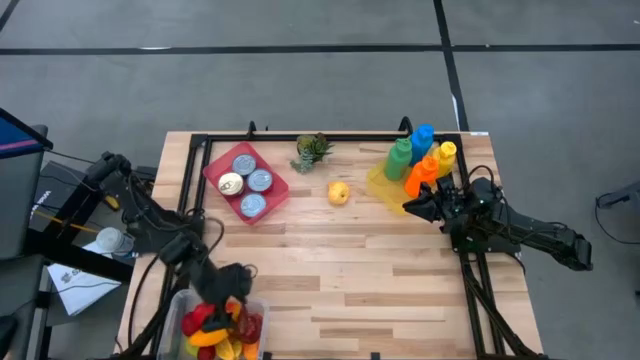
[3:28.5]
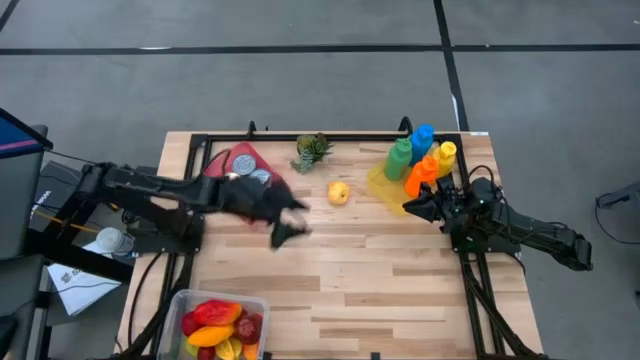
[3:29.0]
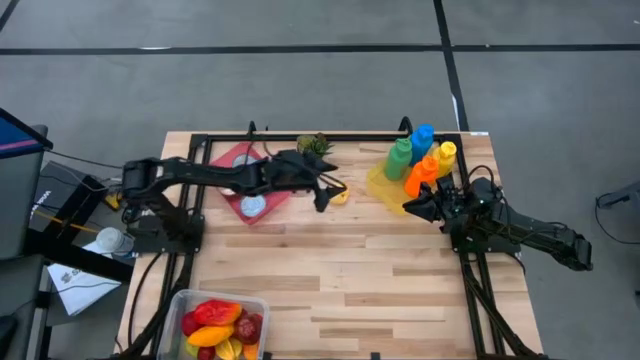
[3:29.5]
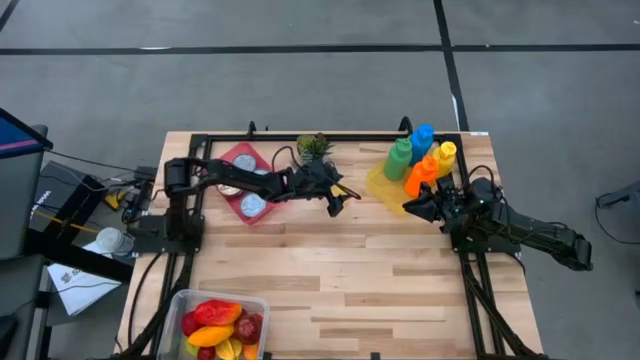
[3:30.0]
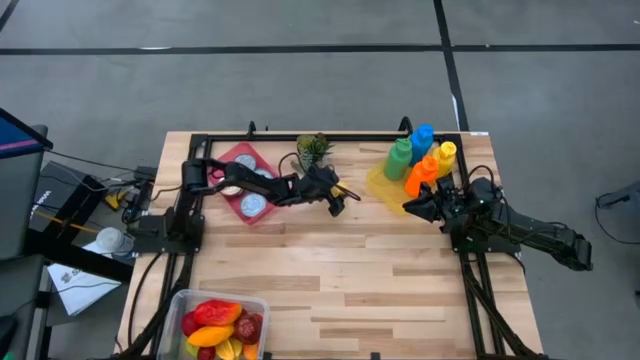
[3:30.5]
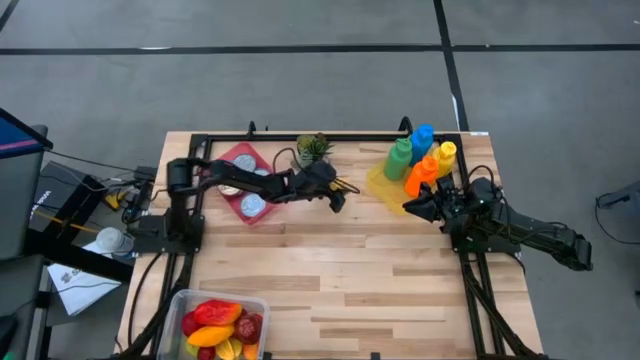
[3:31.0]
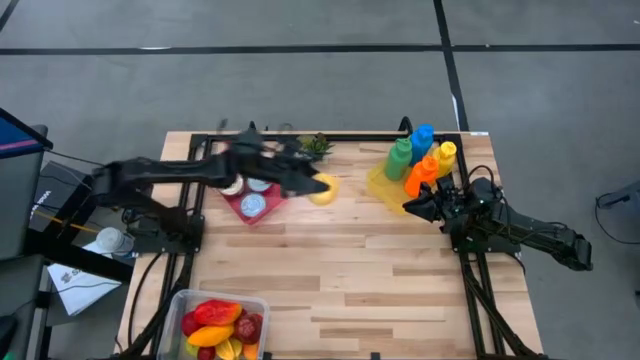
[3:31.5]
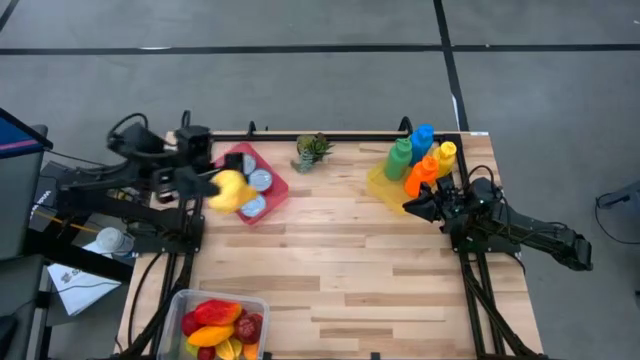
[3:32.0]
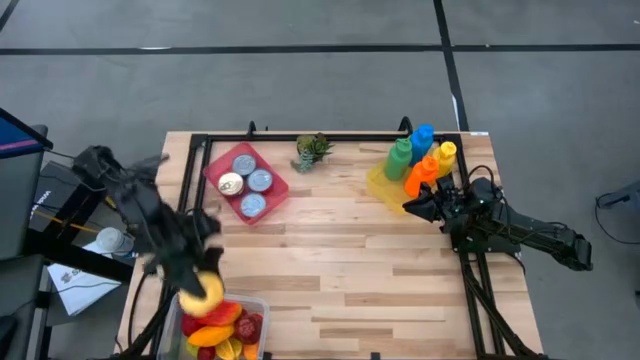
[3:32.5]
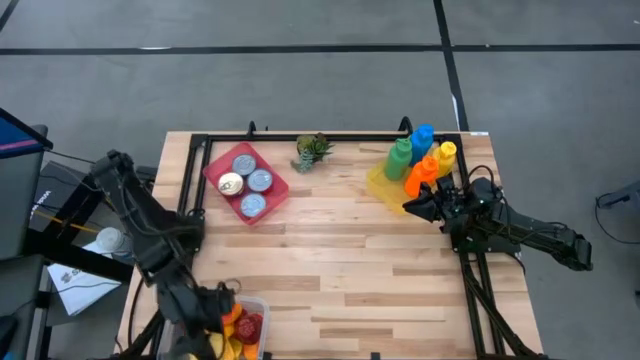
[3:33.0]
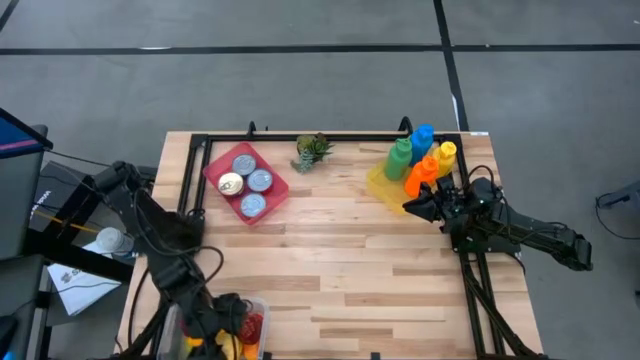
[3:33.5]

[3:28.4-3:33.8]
Task: Pick & Place Food Item
Put the yellow pear into the transparent bin

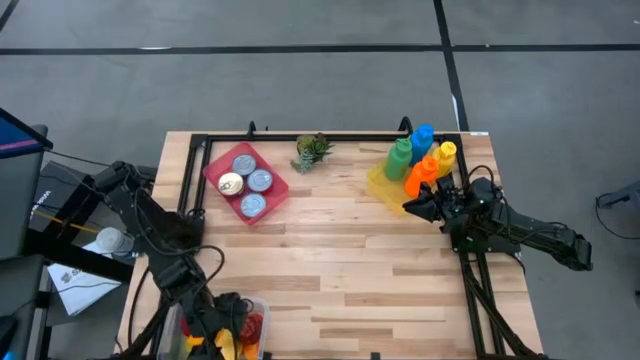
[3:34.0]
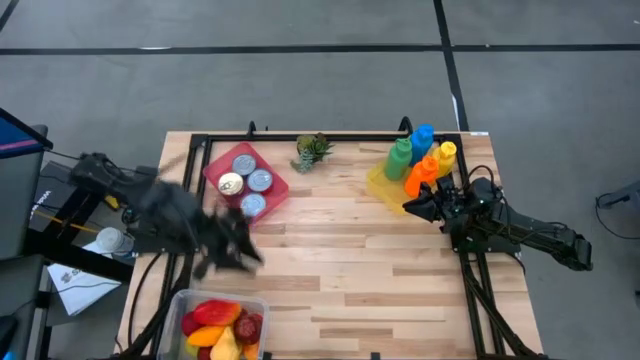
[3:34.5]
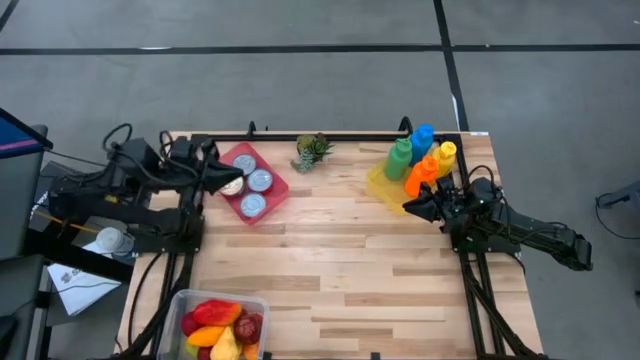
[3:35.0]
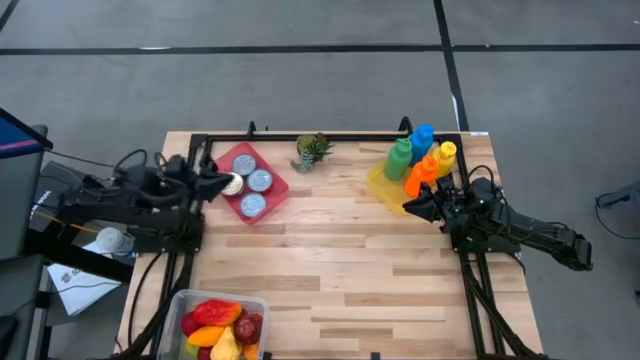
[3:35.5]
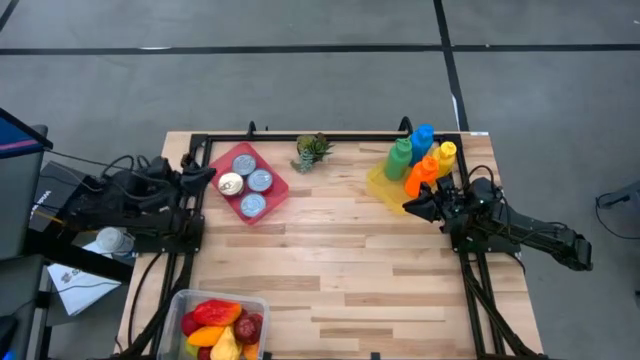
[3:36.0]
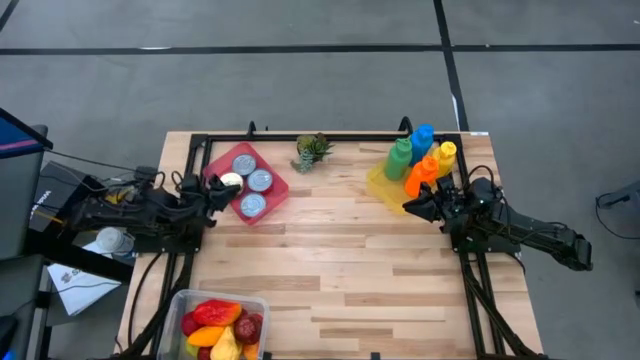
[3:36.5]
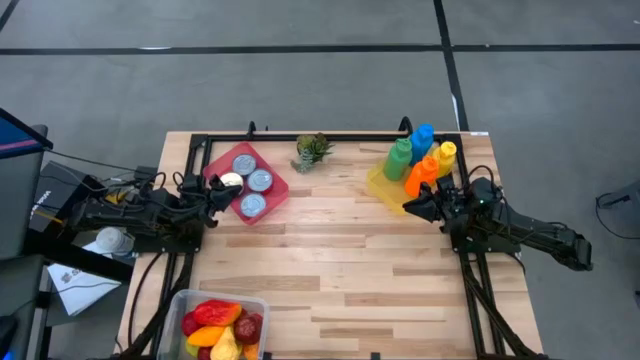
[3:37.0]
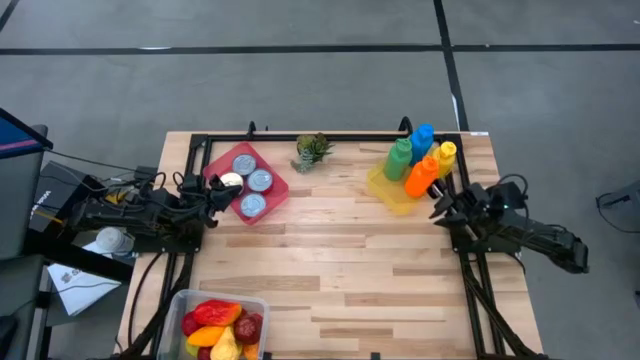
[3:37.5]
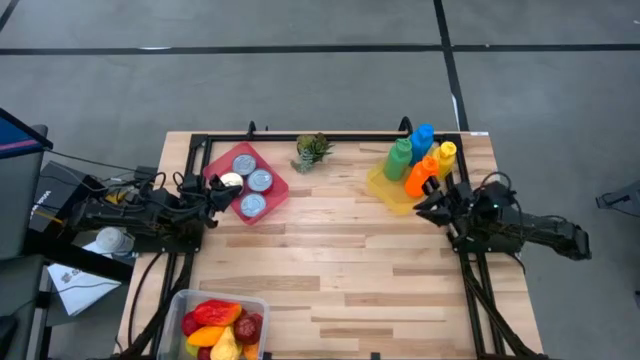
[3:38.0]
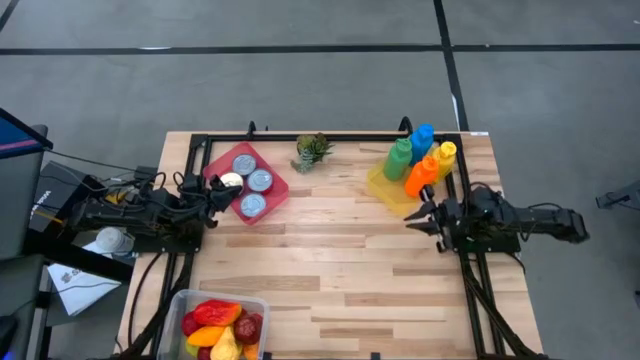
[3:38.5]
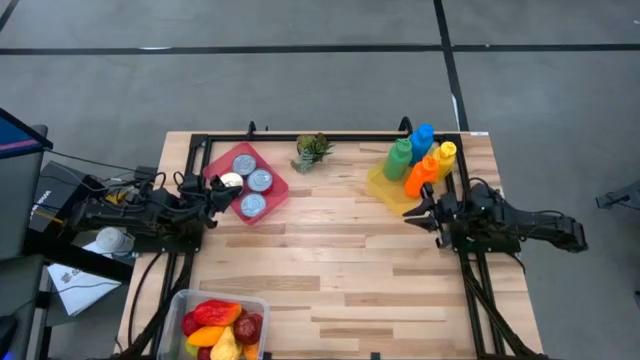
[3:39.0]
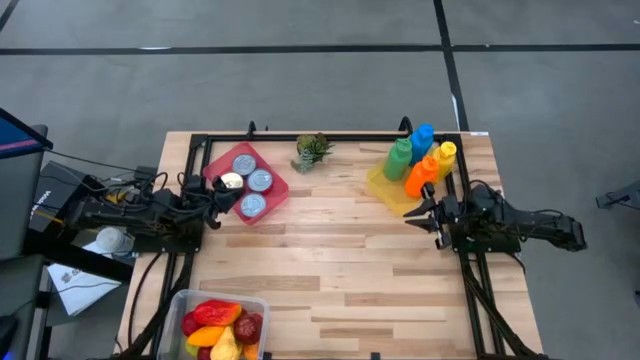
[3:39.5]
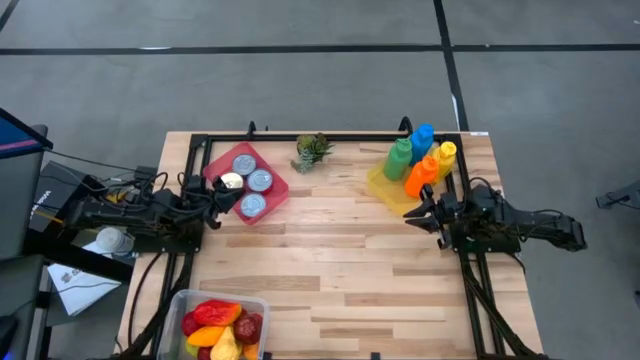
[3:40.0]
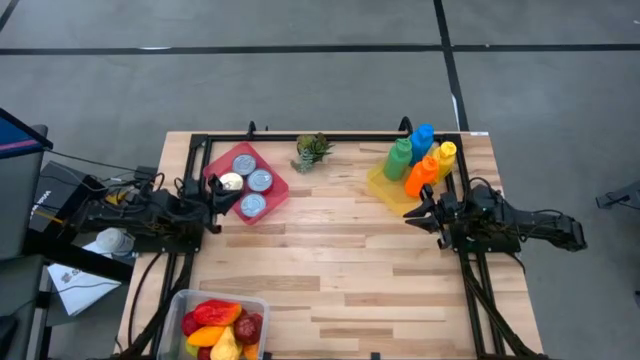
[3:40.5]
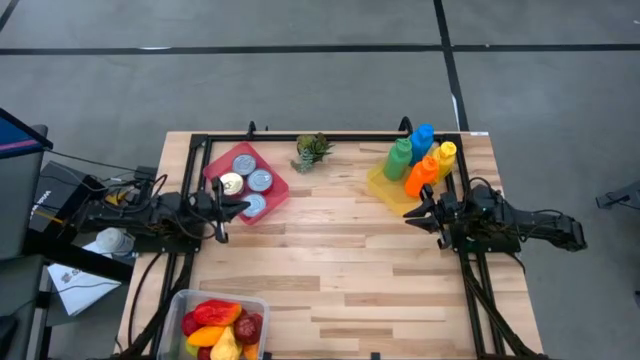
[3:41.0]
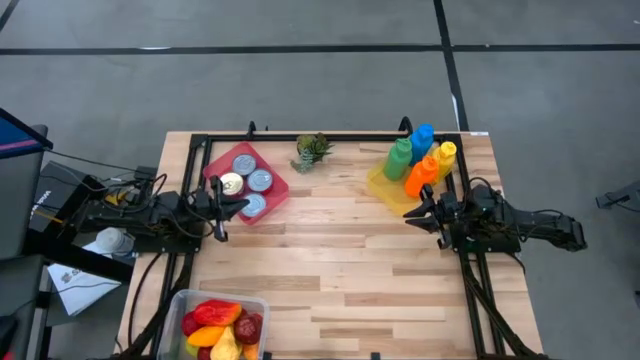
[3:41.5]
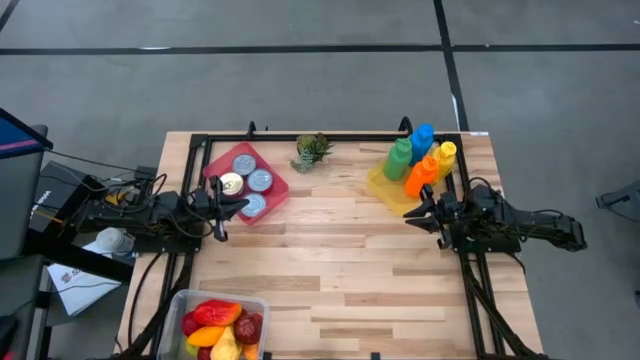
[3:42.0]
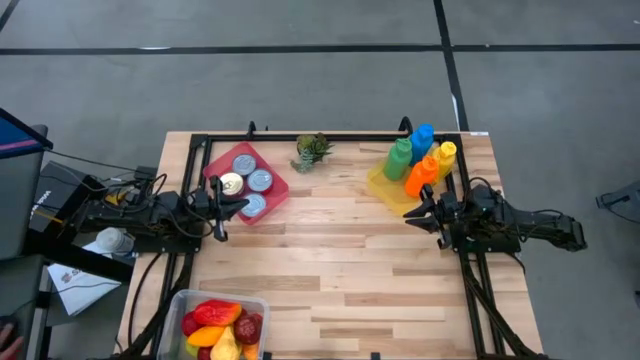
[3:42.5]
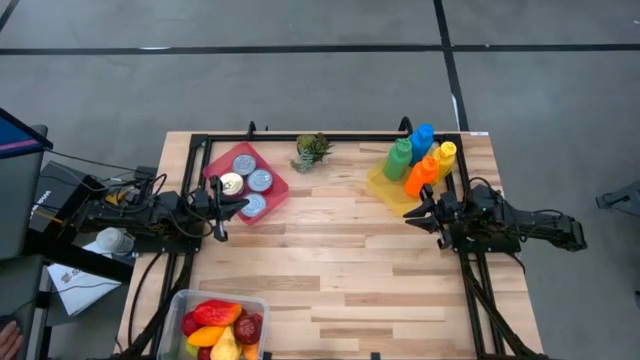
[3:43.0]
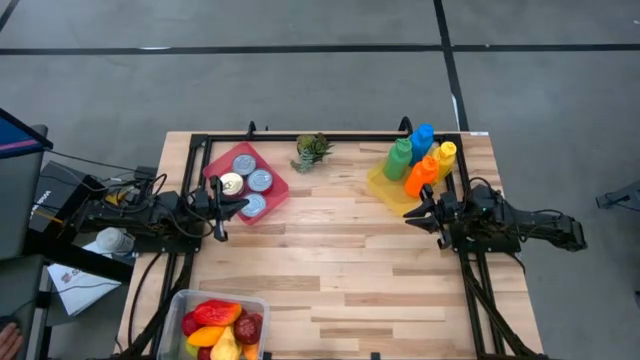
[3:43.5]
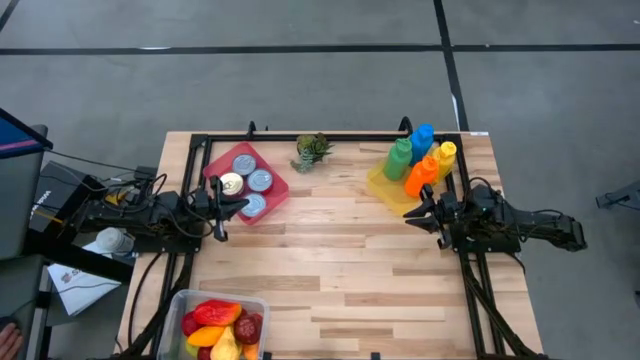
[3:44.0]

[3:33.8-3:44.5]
Return to Home Position

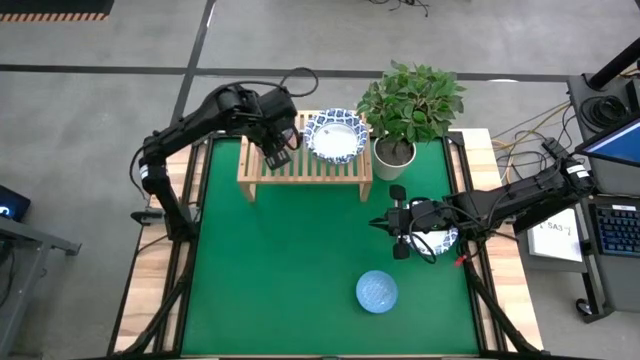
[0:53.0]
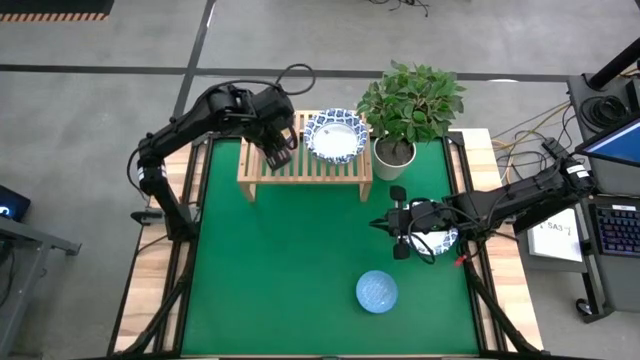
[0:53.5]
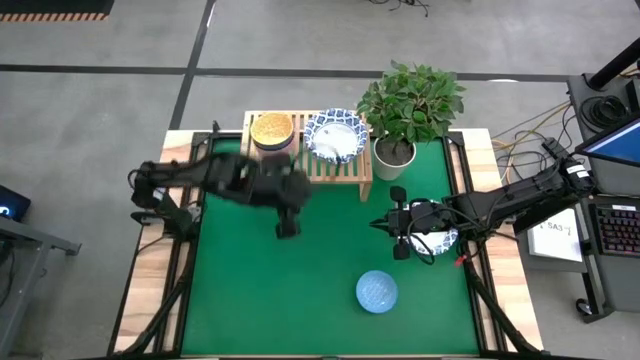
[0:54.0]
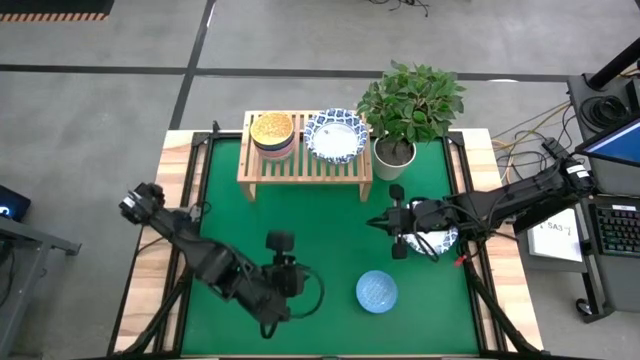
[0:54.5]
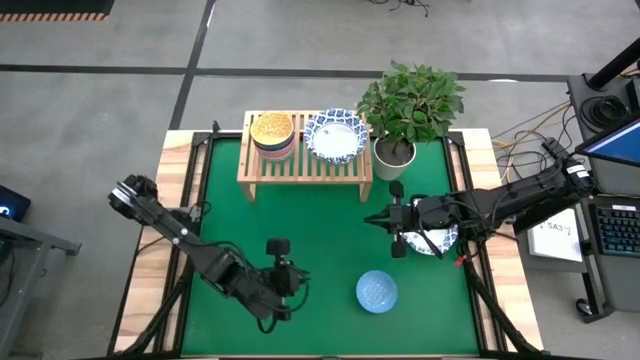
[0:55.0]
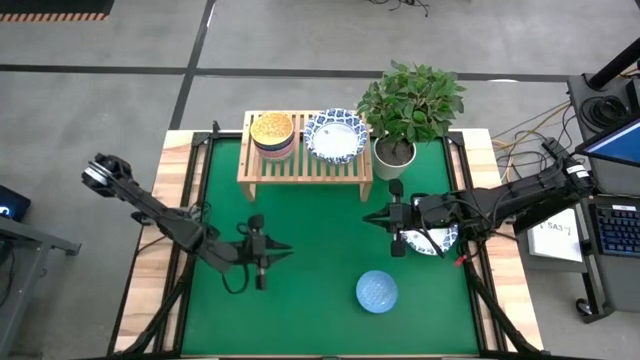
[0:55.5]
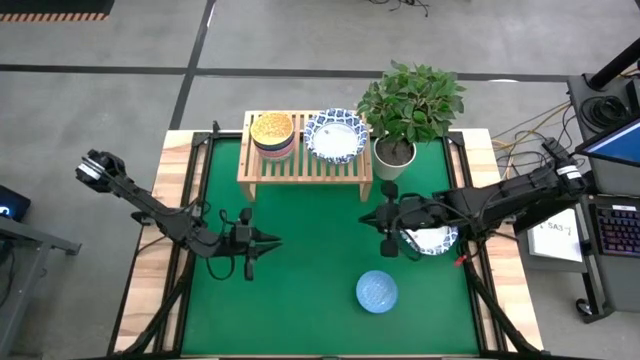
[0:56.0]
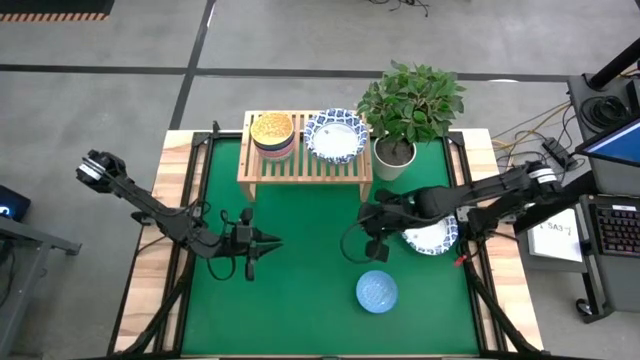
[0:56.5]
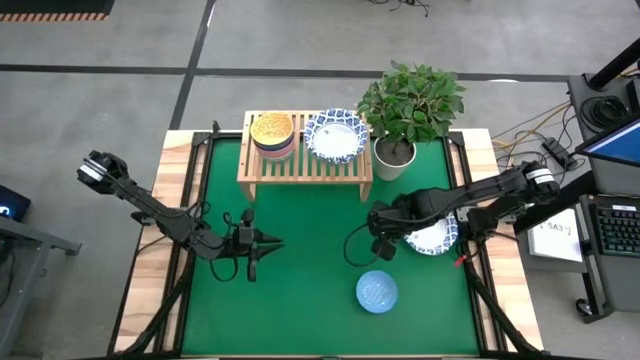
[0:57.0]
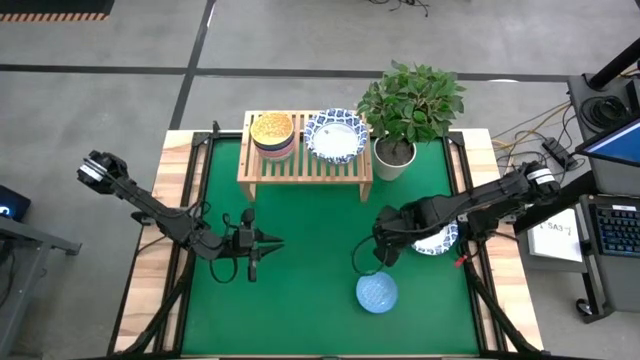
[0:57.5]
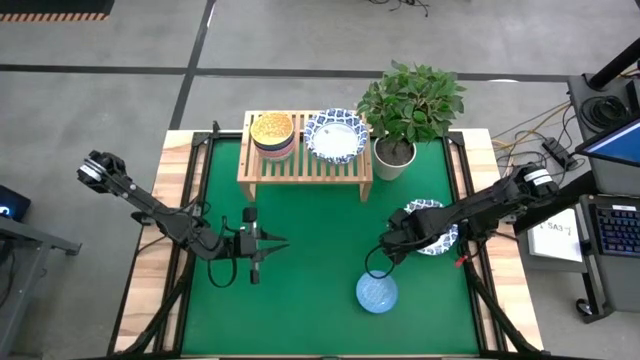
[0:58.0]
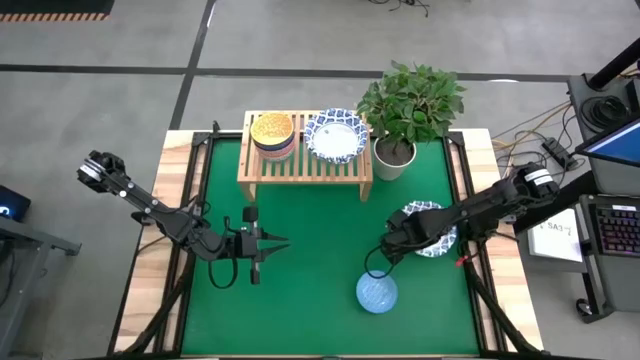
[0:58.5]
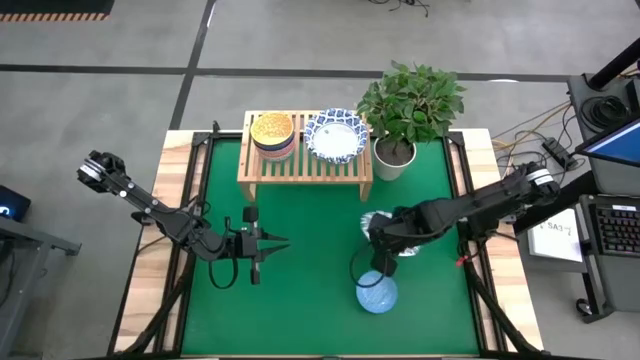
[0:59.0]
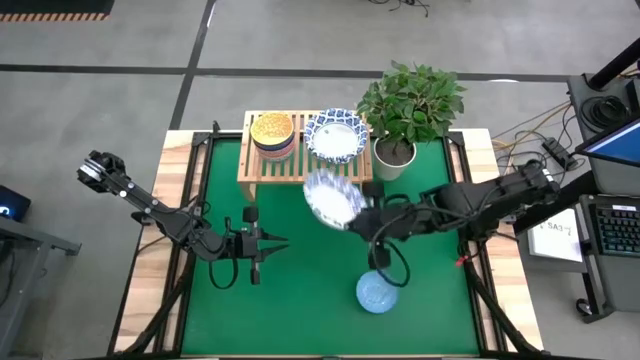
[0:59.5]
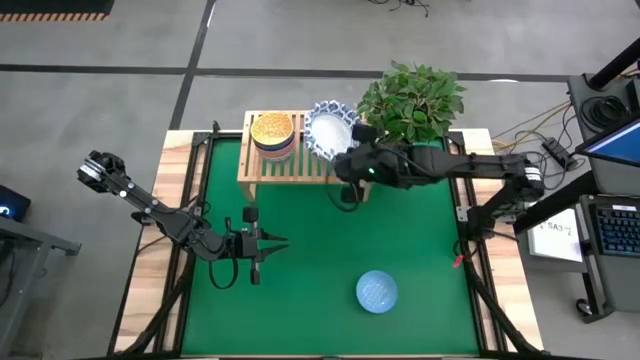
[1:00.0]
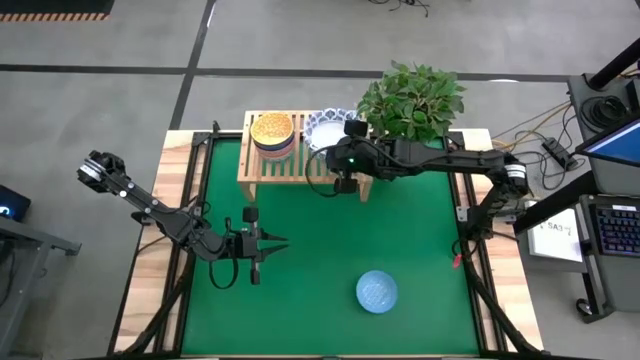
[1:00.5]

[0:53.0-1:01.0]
Task: Place and stack plates onto a shelf
Stack the white and blue plate on top of the white and blue plate on the shelf
